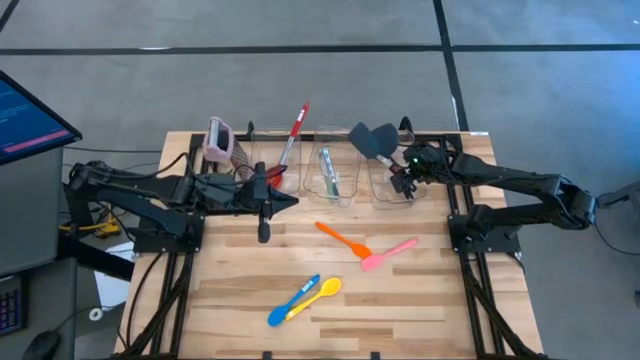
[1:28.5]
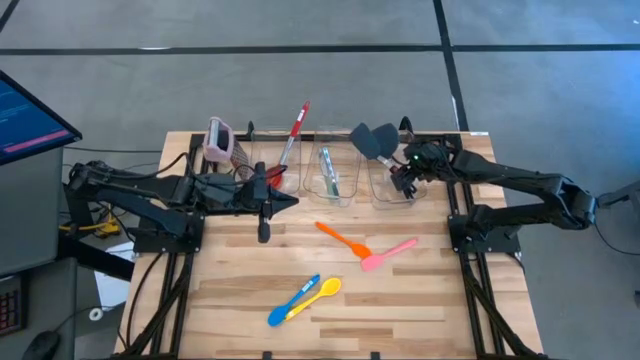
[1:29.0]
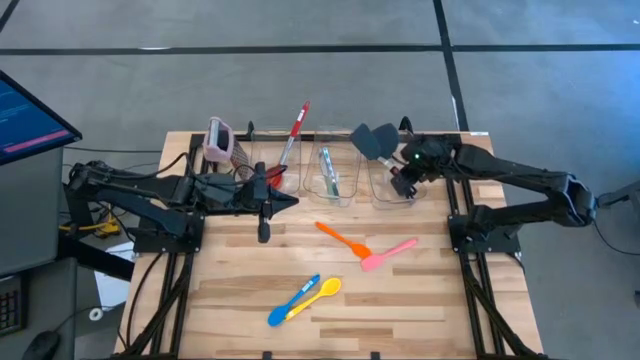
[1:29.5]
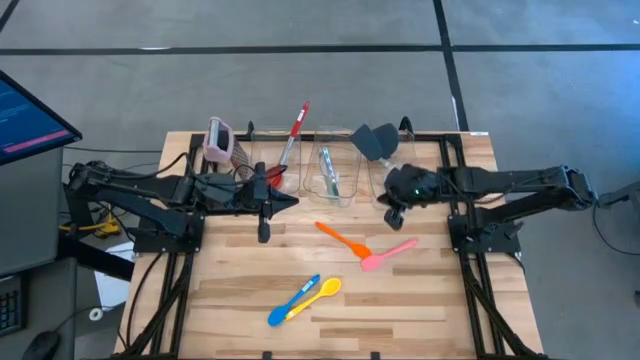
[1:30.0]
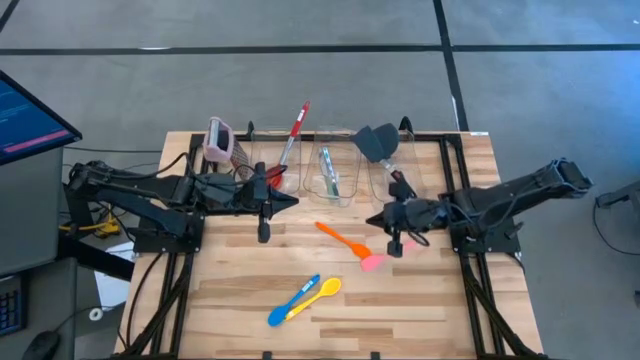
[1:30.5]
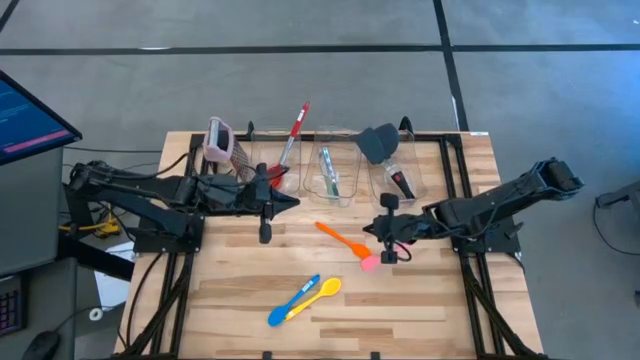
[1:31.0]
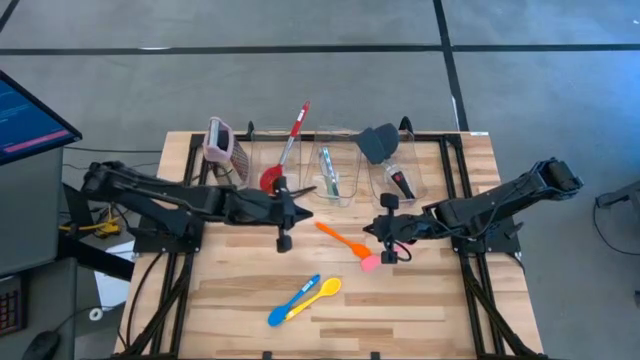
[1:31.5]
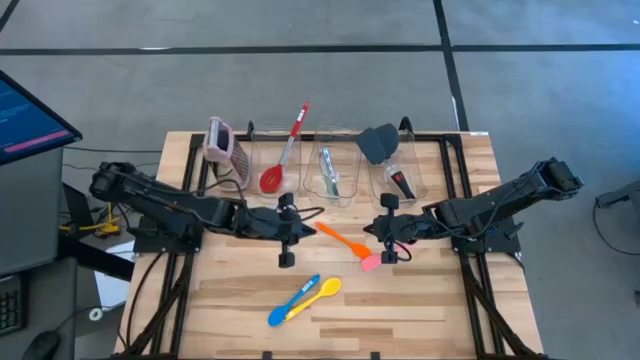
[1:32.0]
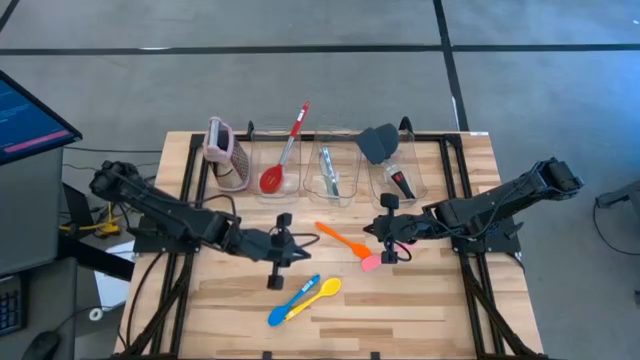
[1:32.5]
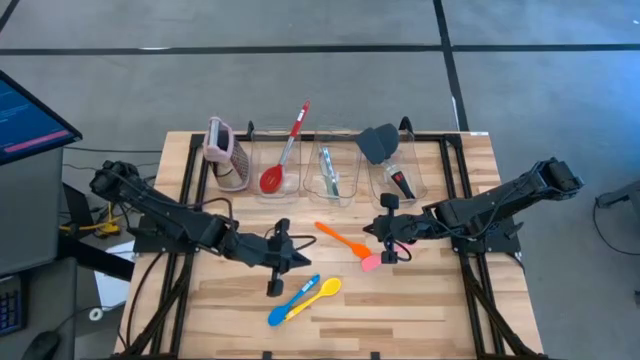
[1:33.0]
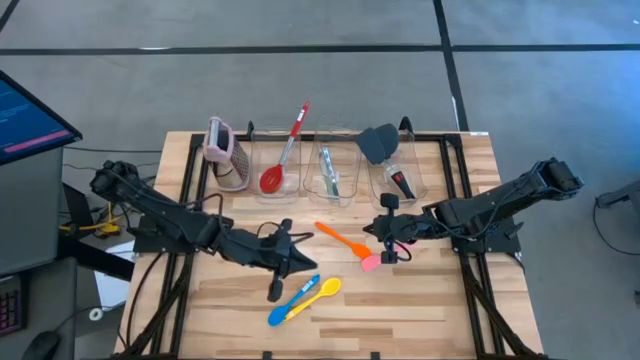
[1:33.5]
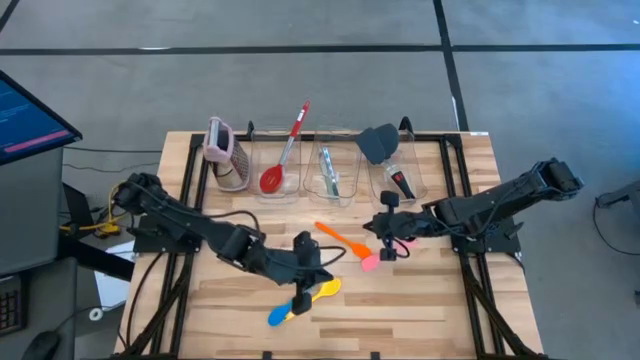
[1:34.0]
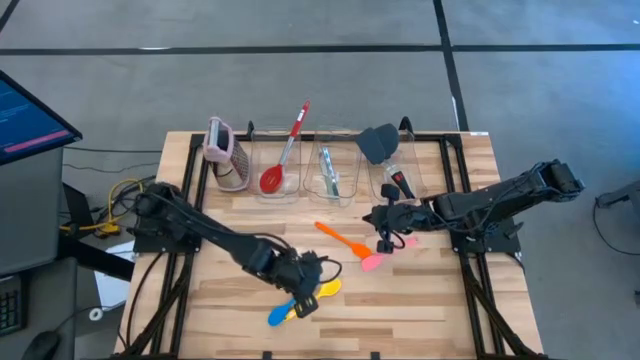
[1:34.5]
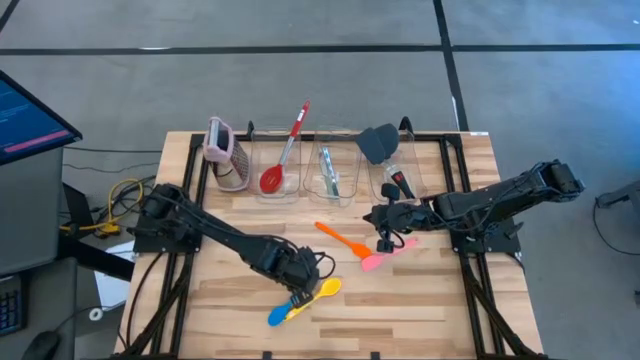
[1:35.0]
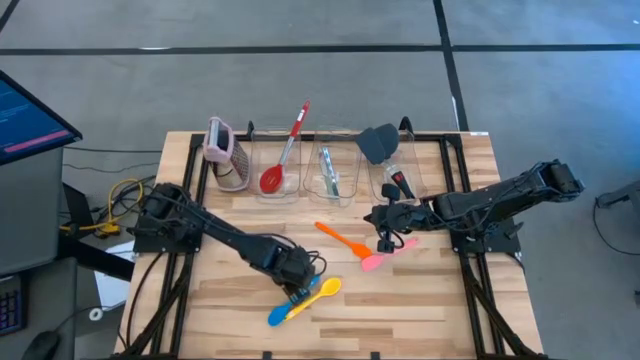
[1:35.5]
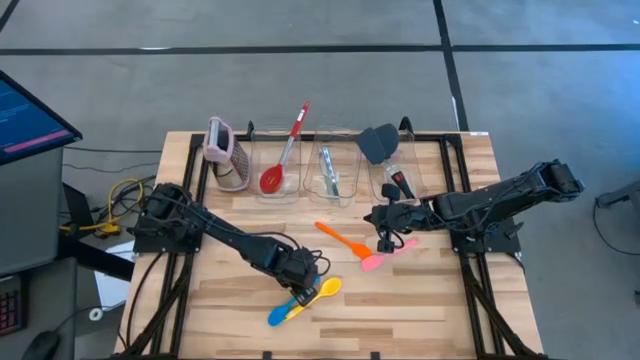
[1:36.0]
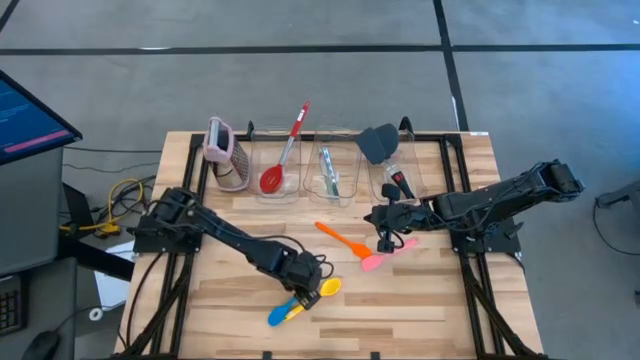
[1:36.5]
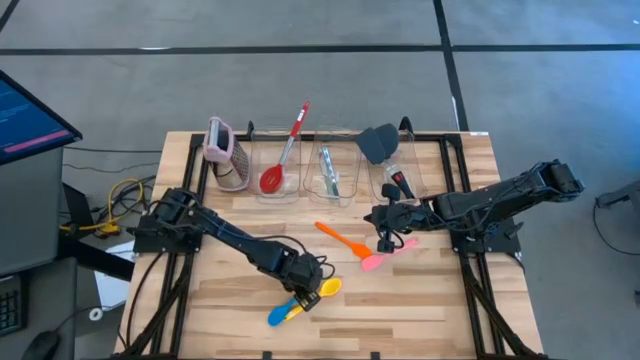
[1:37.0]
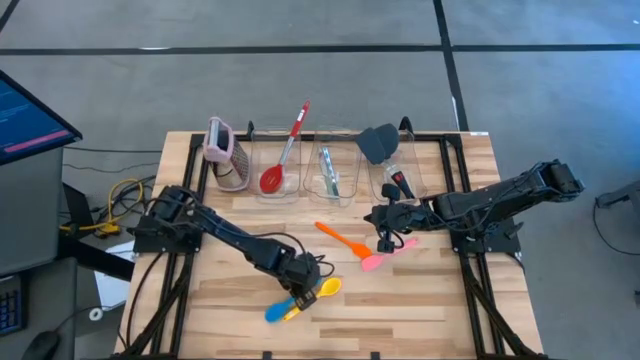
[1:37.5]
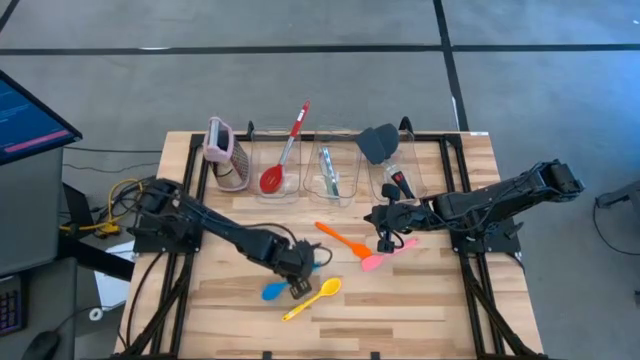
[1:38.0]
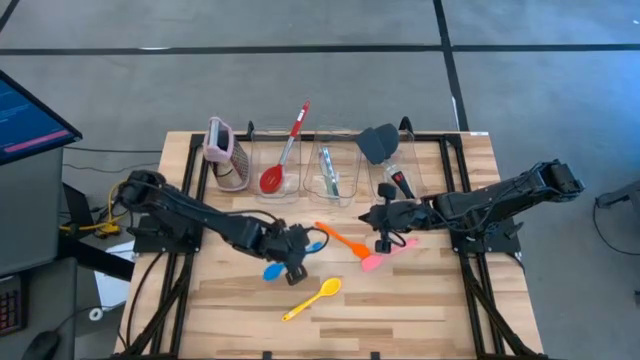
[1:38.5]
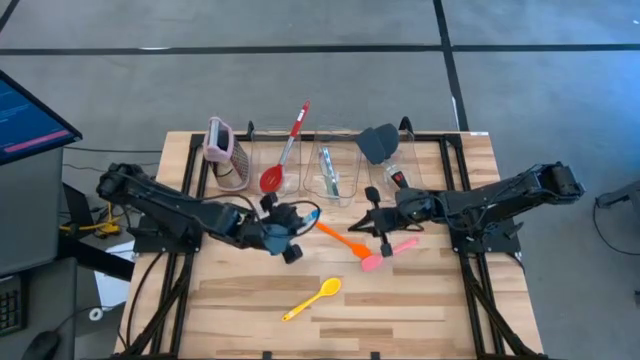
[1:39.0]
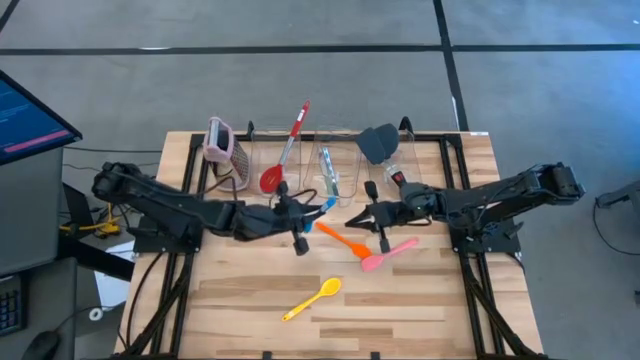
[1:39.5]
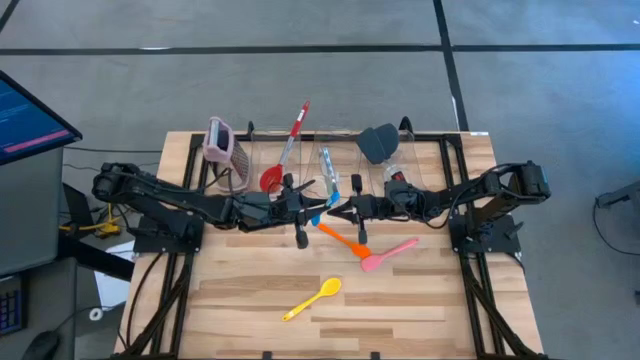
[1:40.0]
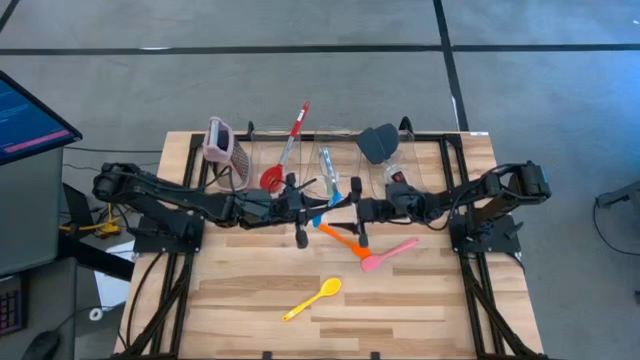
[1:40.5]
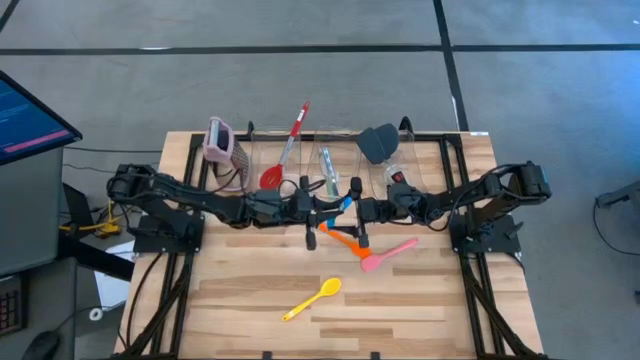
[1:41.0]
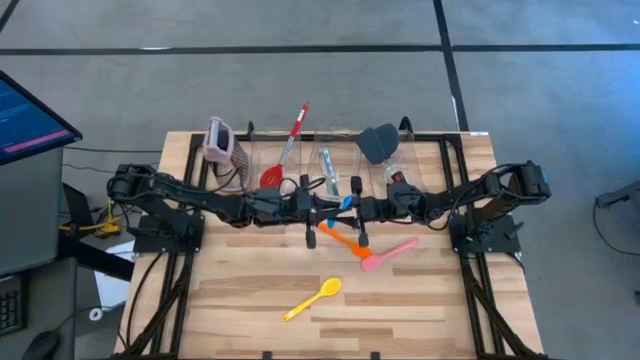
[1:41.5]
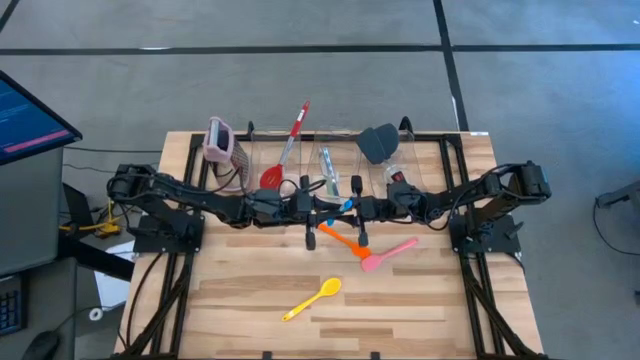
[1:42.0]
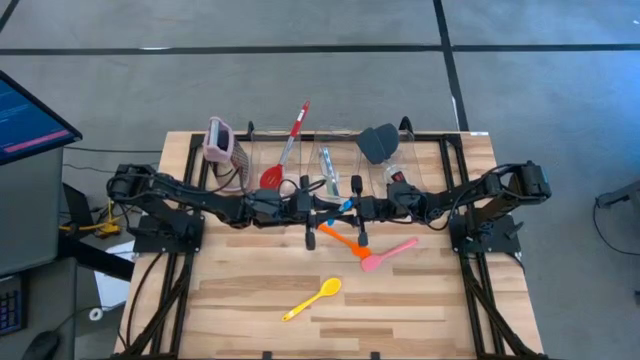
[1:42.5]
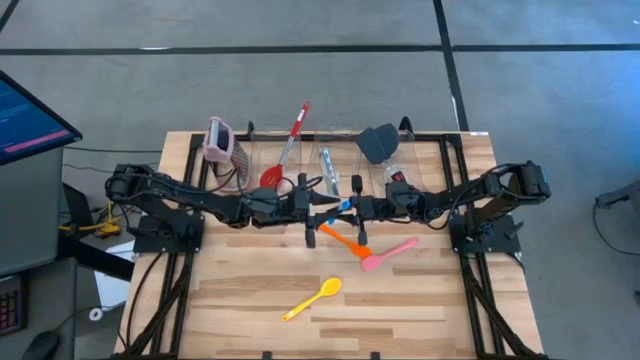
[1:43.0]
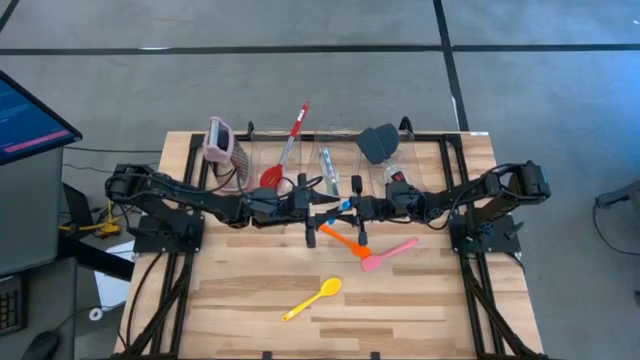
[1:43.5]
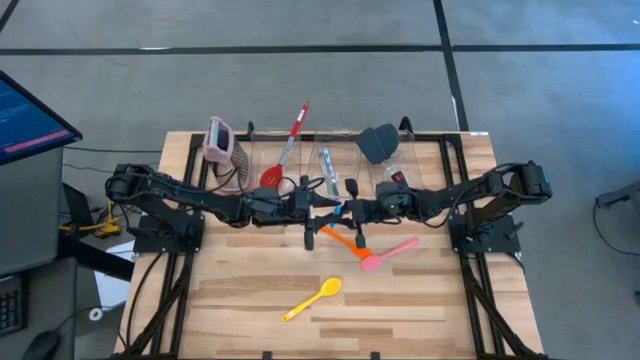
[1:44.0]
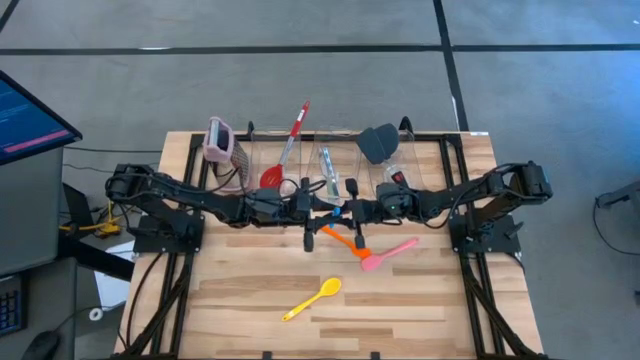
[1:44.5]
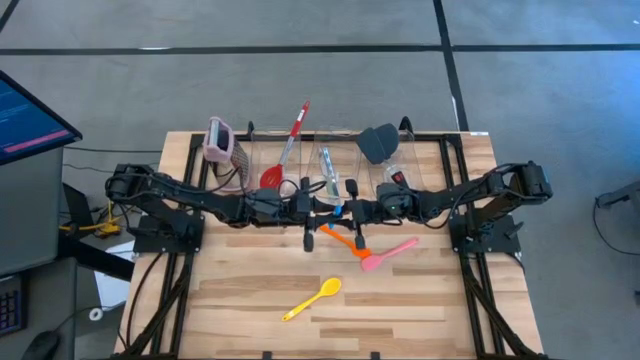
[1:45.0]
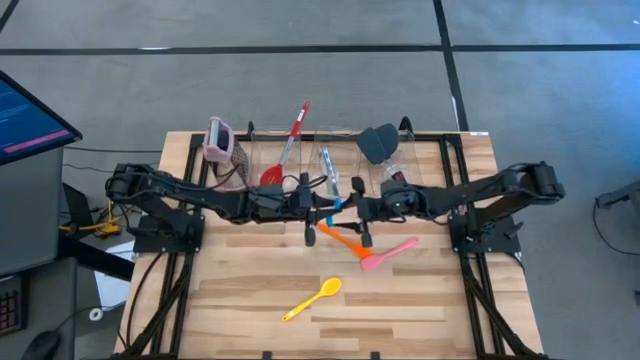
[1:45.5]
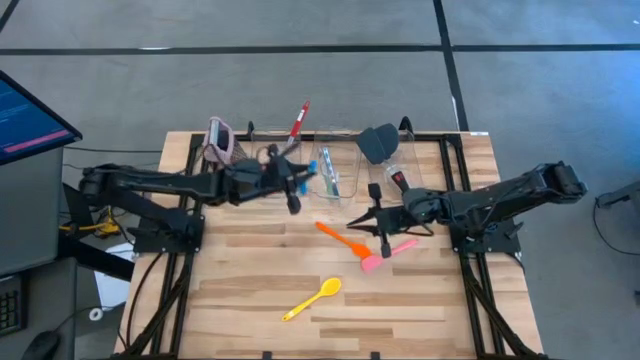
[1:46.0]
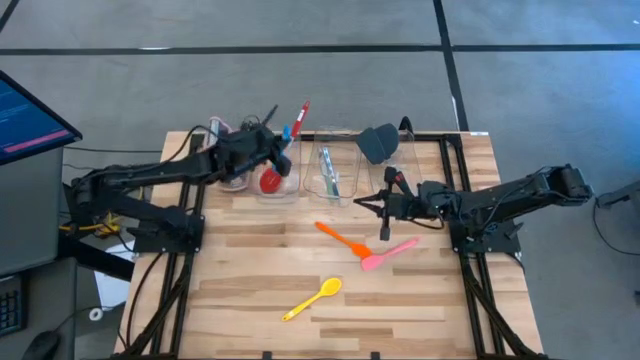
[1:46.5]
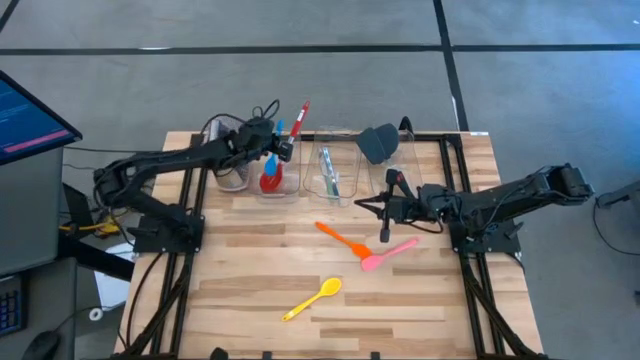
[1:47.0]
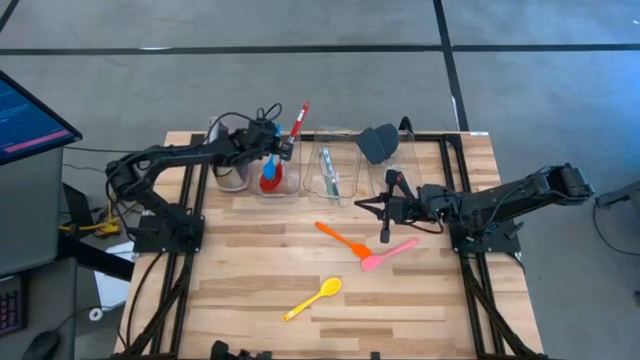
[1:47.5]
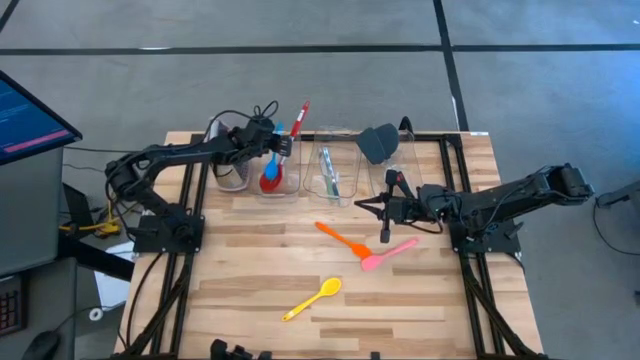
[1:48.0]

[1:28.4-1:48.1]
Task: Pick & Place Kitchen Items
Put the blue serving spoon into the left transparent bin

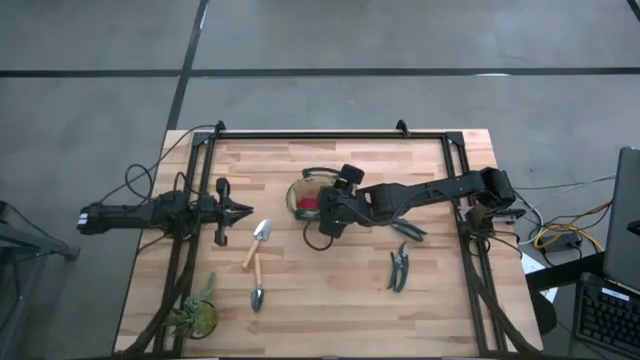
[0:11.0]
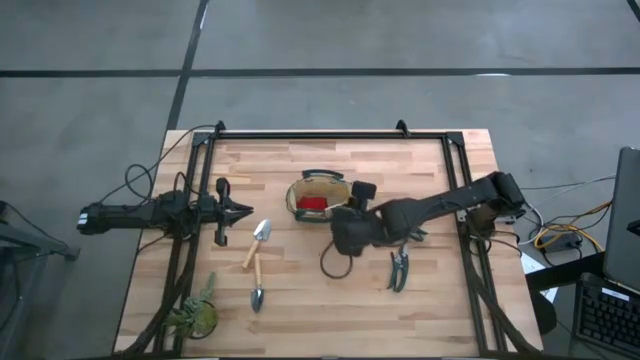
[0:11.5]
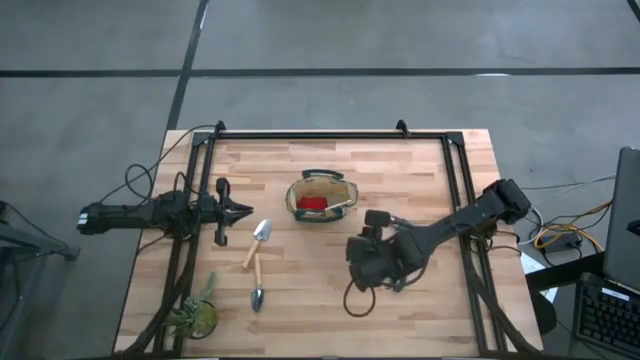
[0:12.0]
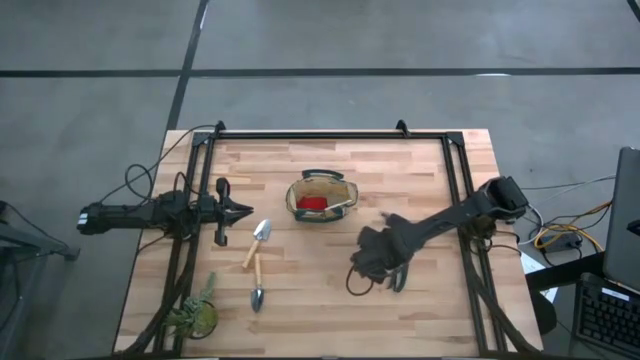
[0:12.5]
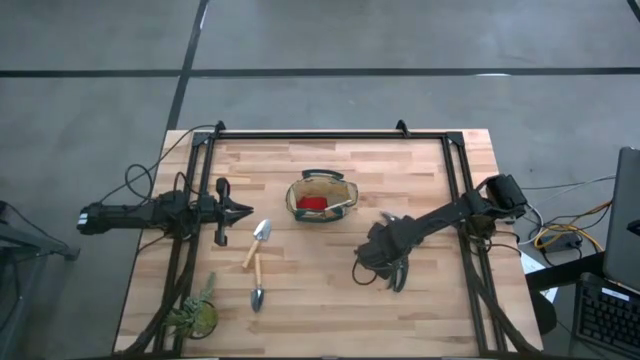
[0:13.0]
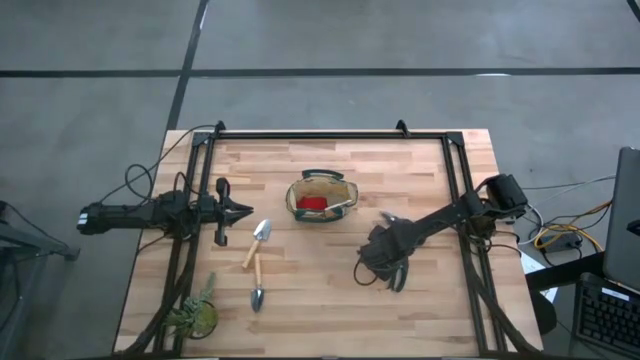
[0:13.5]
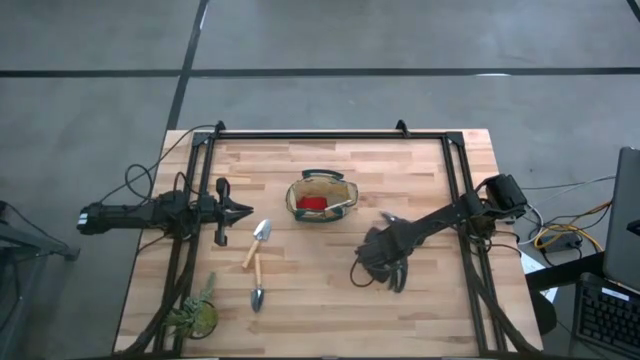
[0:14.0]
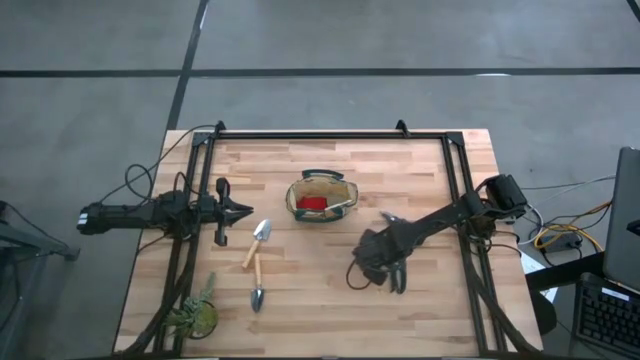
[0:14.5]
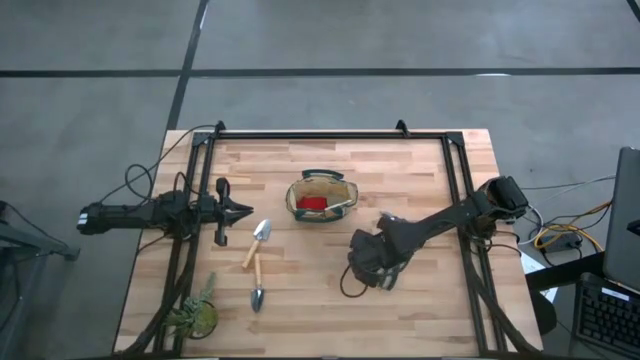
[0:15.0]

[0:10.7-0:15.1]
Task: Pick & Place Garden tools in Gardening bag
Put the bottom green shear scissors into the light brown gardening bag
